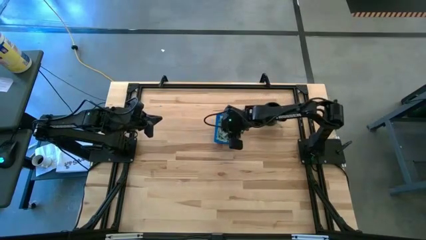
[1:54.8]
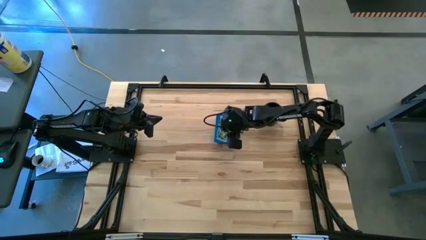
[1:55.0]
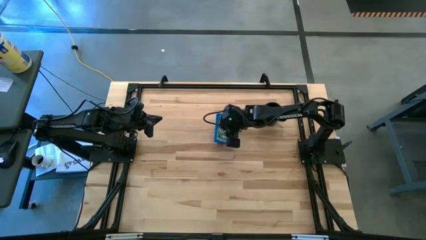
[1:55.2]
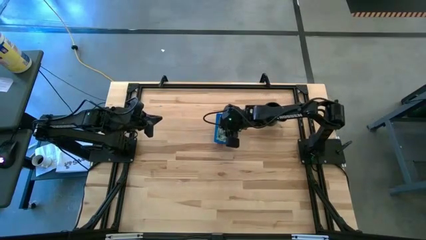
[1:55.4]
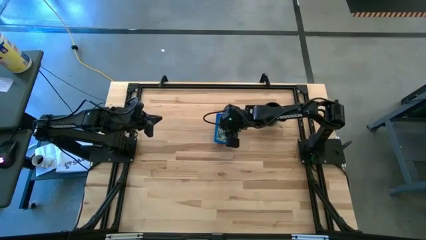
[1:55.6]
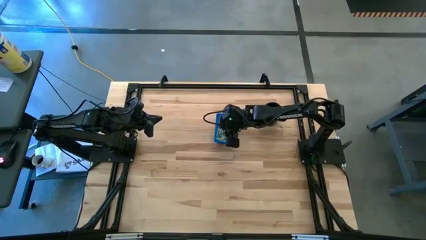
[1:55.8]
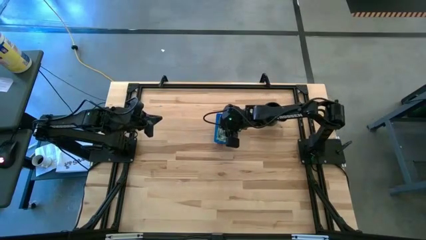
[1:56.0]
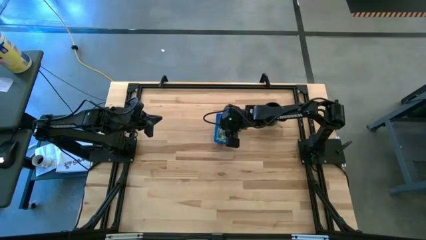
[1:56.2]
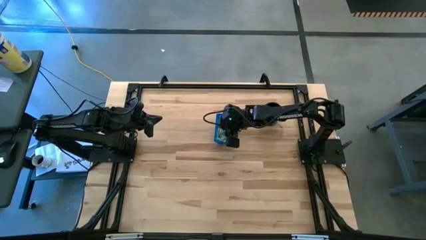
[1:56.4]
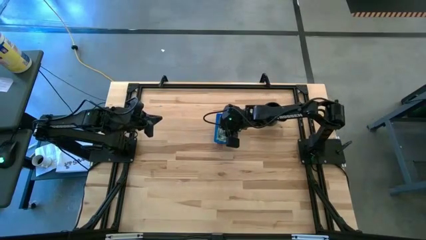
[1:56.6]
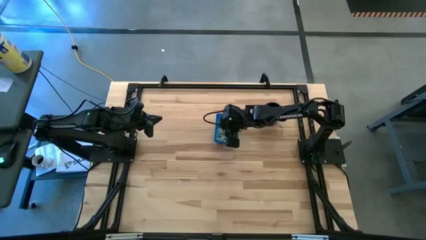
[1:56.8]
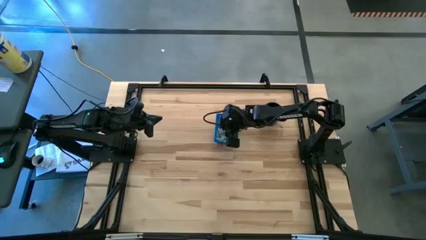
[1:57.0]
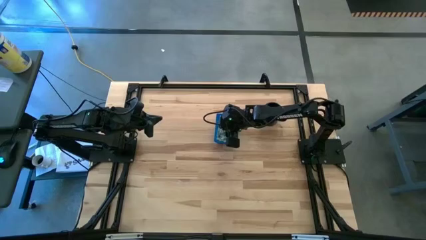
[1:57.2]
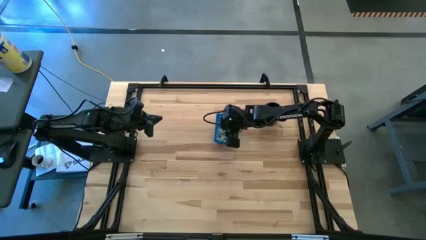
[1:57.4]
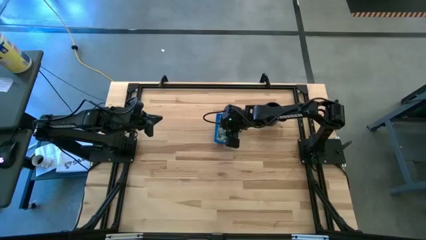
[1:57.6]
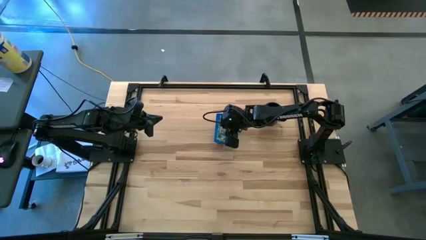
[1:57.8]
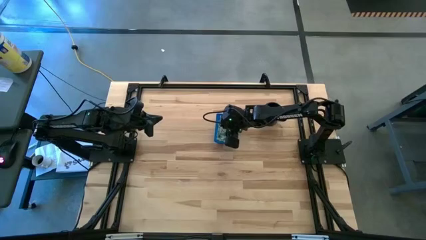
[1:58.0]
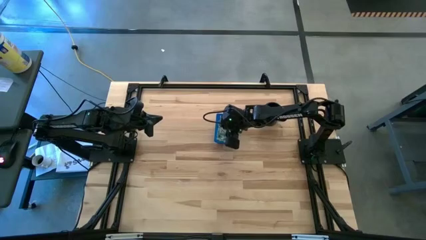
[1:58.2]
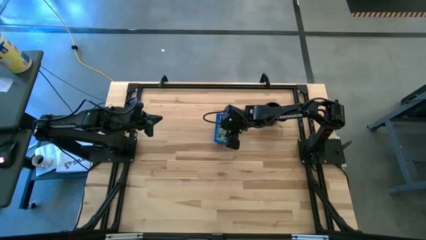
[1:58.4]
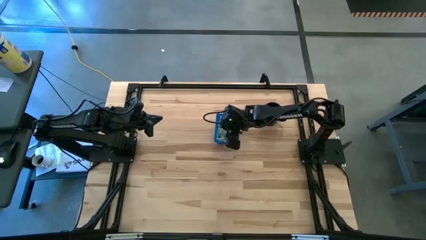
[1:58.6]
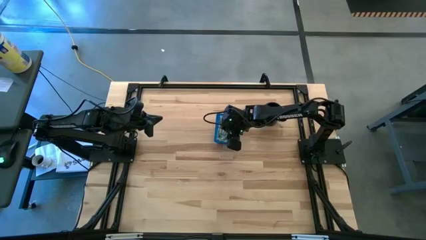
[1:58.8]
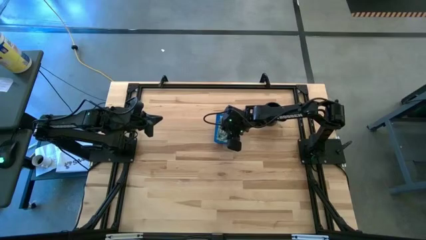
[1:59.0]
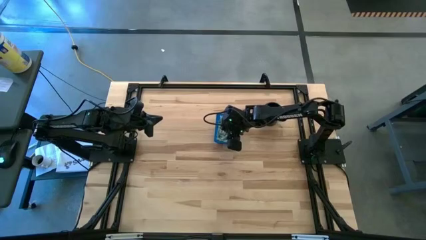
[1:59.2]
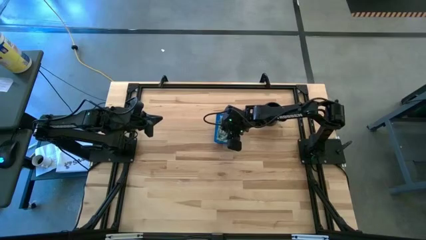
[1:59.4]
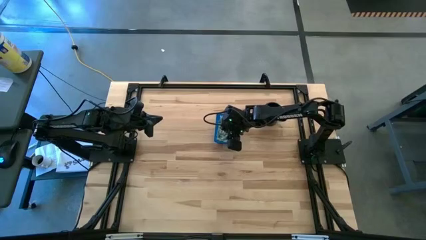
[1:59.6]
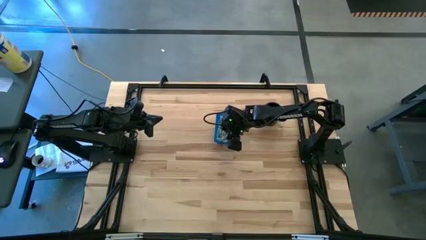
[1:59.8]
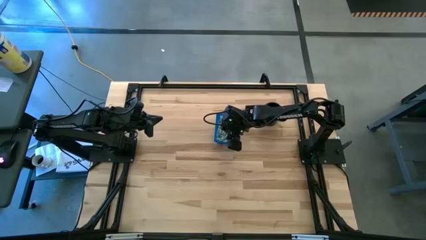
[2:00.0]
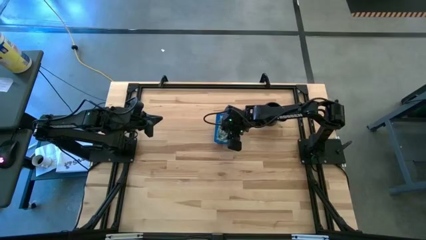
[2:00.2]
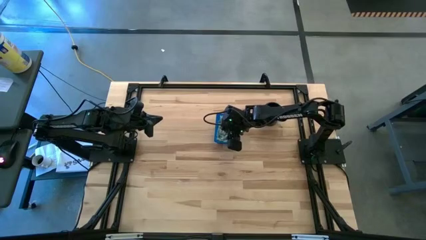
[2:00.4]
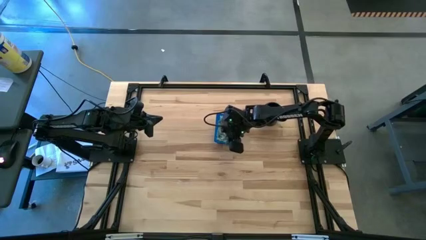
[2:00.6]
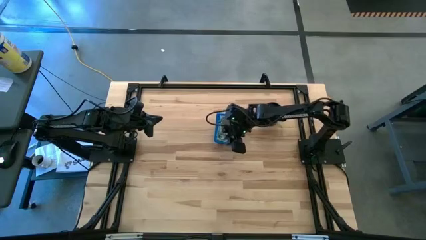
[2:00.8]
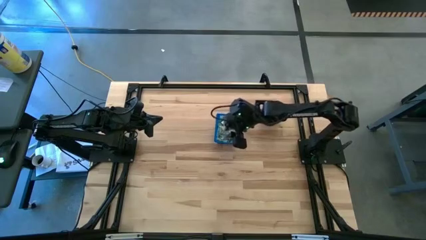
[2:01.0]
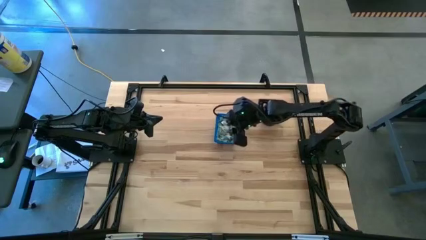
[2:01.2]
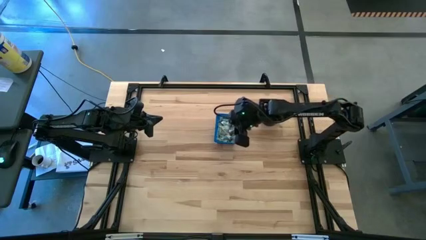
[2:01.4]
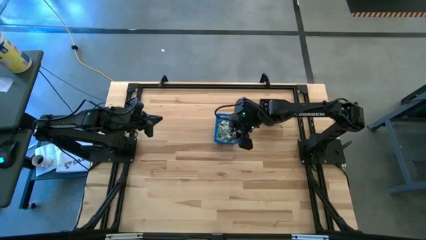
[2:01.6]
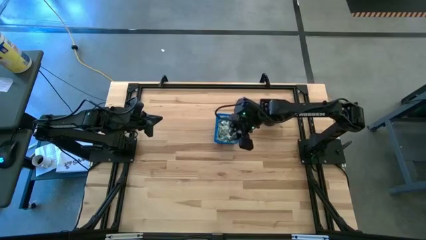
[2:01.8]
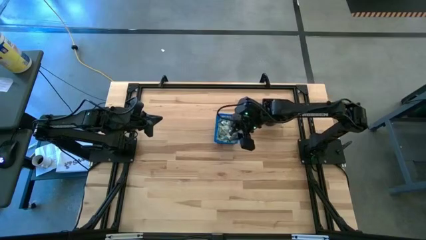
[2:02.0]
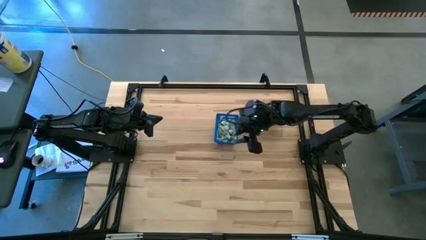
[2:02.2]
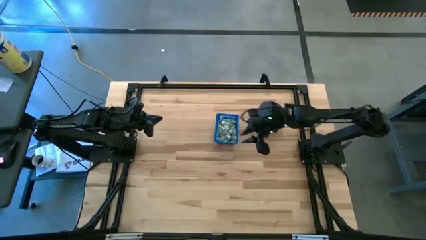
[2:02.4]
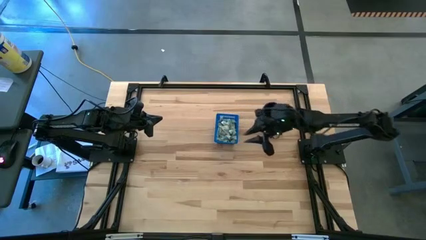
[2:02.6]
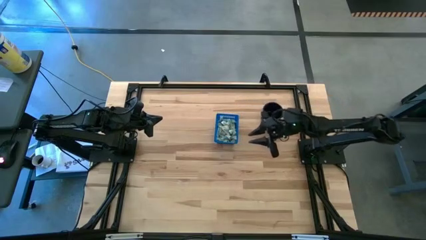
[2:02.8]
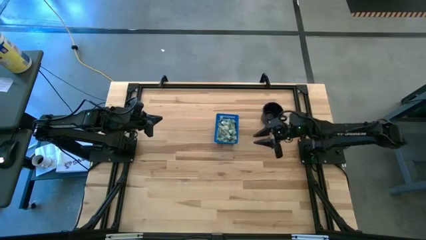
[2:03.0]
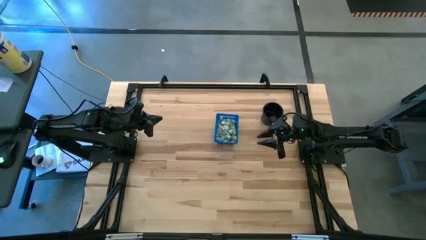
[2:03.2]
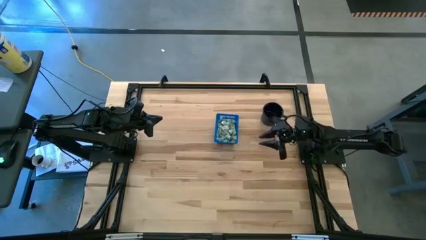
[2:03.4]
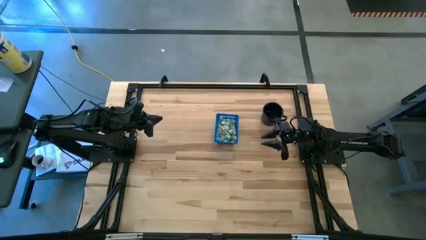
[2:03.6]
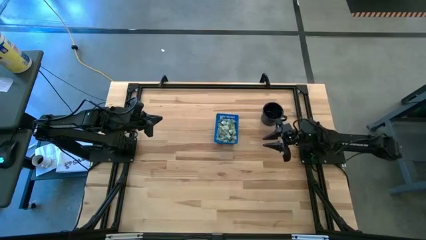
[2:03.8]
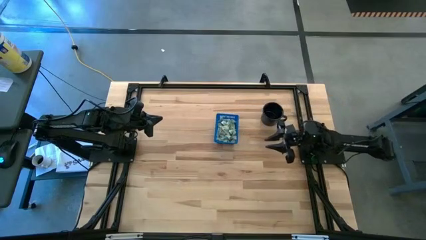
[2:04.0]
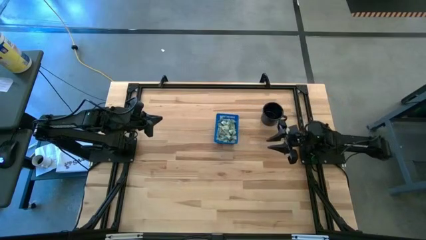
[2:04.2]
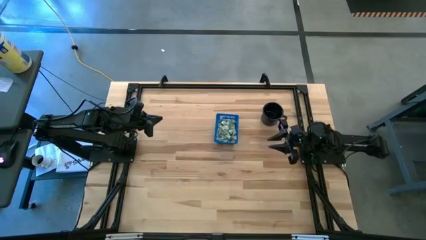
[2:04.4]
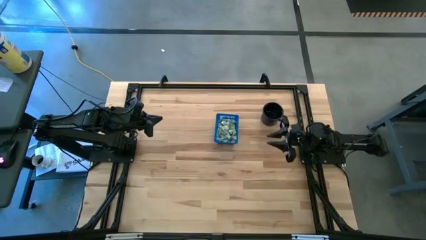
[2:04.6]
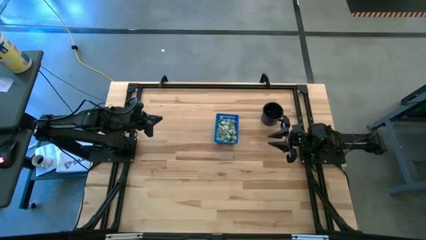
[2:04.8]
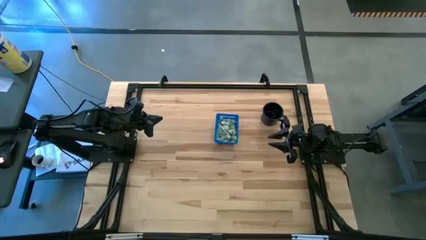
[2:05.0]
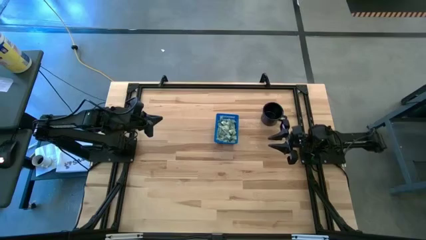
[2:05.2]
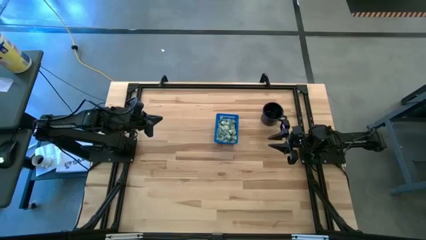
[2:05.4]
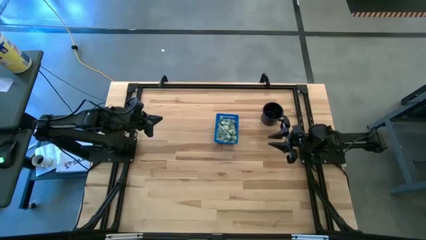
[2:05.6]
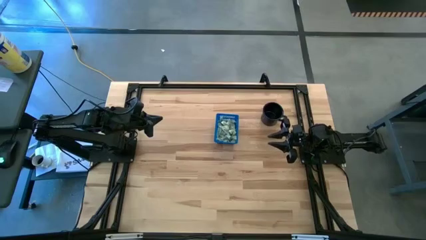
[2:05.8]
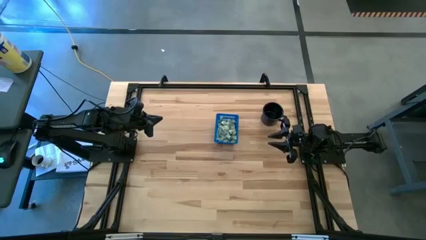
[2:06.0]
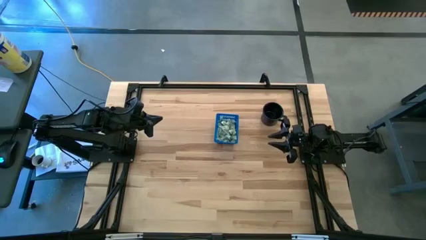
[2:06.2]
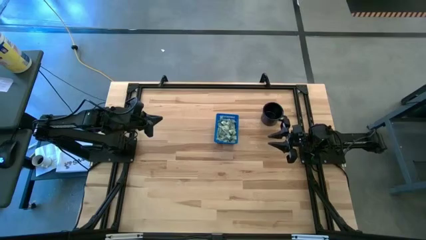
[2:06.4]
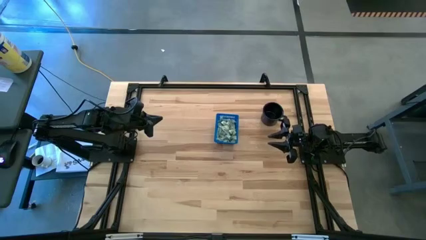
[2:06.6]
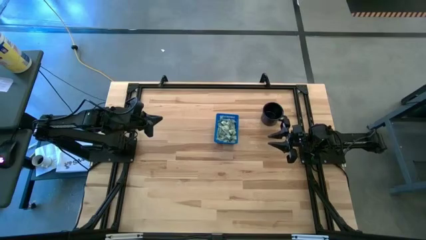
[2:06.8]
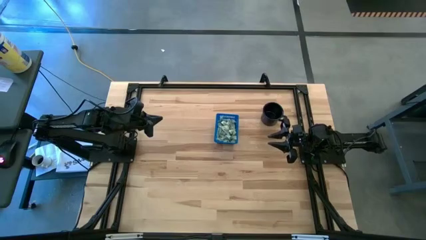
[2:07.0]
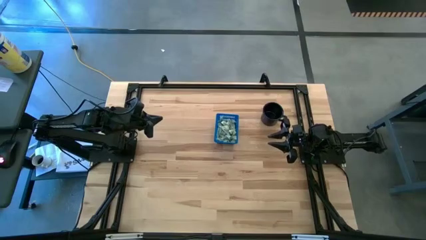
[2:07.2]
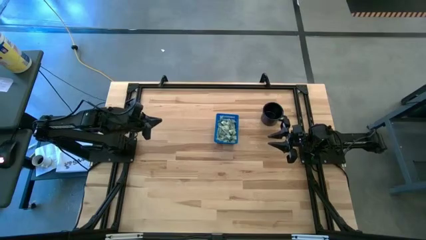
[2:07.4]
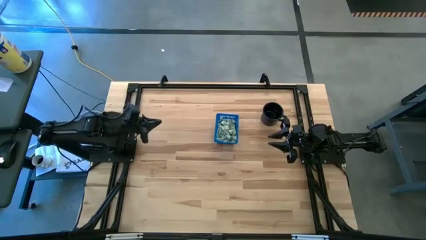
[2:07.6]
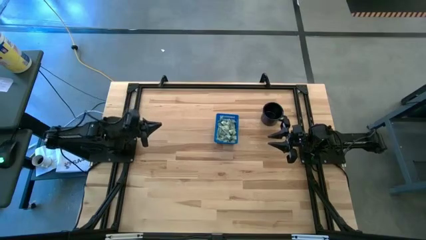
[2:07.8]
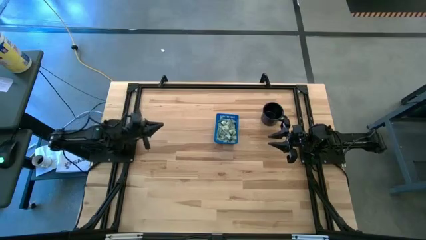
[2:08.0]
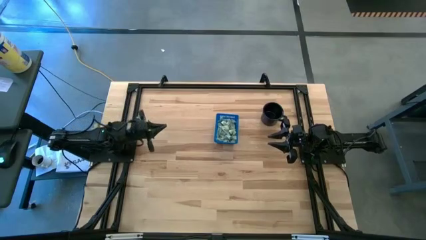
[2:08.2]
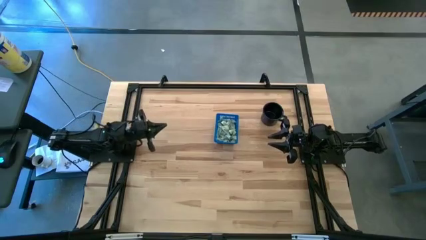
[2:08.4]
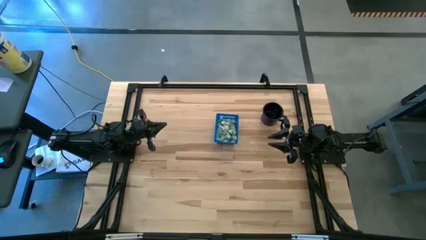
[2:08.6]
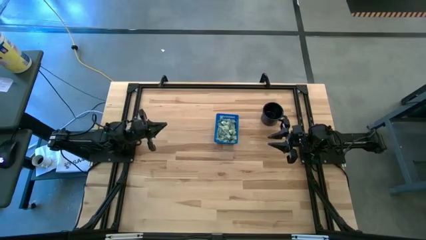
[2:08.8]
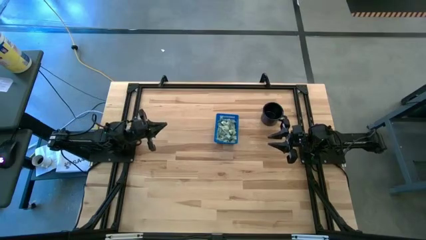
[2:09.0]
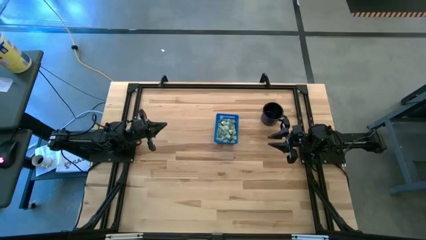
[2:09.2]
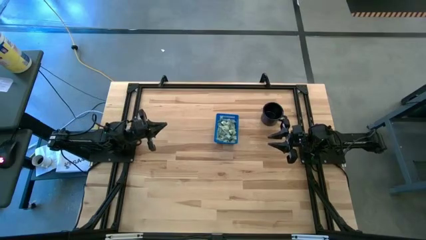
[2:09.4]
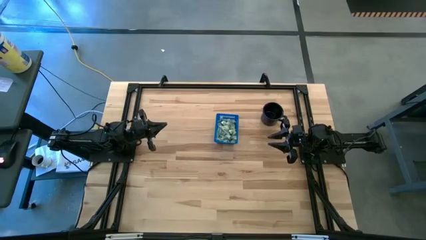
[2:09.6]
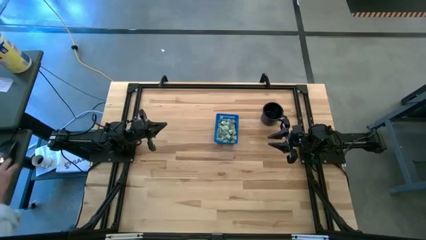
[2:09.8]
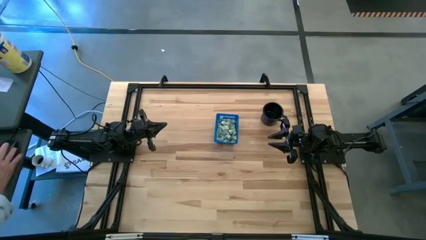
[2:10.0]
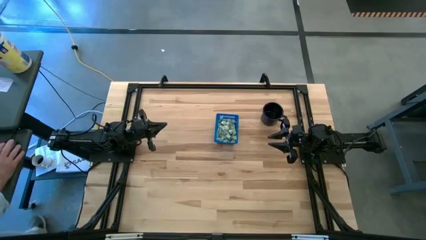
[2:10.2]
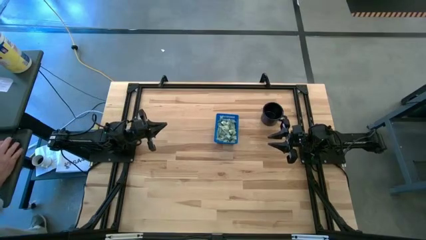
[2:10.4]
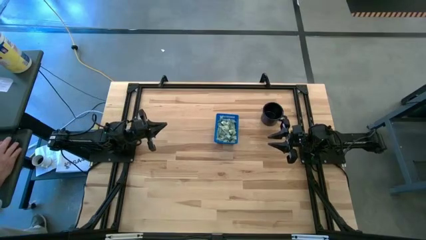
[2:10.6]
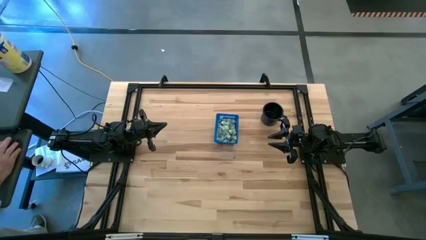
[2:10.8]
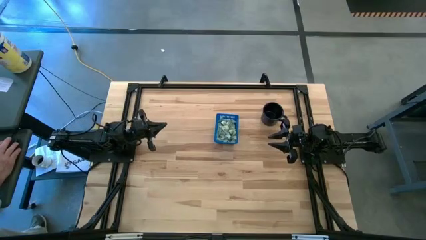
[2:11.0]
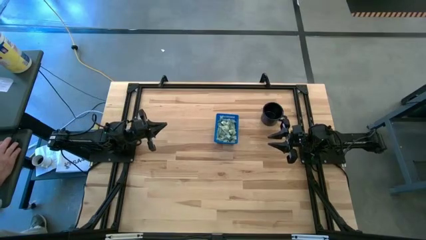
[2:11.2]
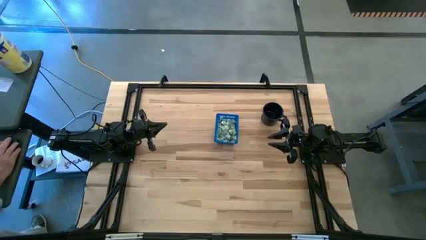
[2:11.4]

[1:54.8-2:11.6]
Task: Pick and place Stevia / Truvia into bins
Return to Home Position
